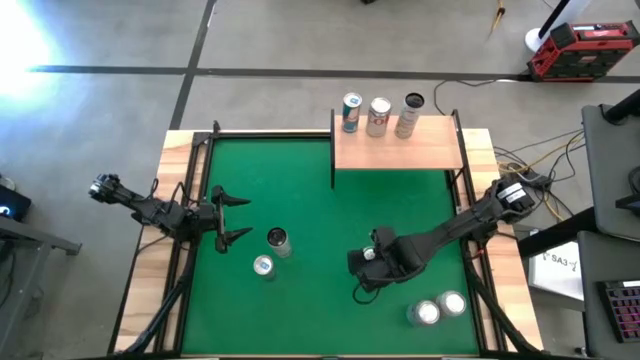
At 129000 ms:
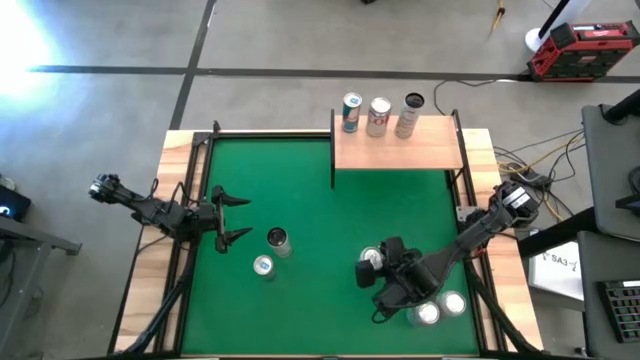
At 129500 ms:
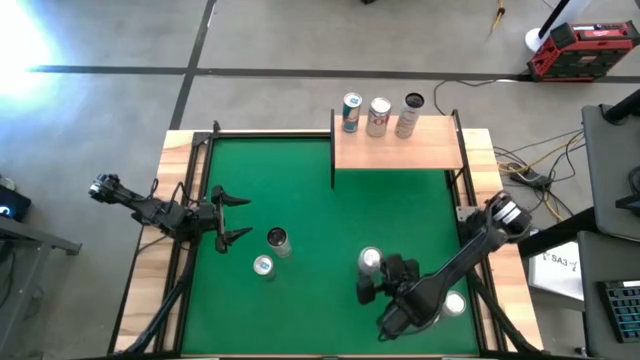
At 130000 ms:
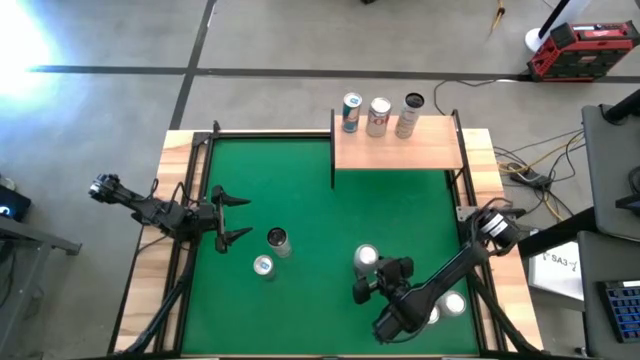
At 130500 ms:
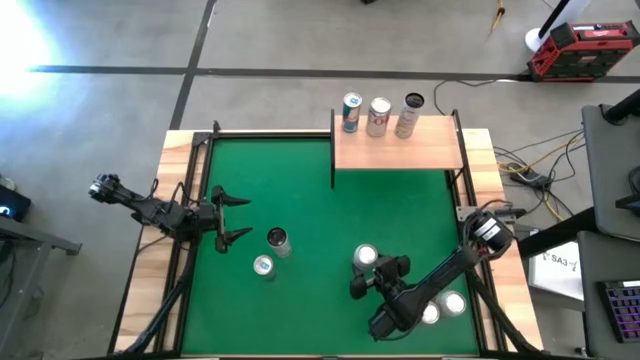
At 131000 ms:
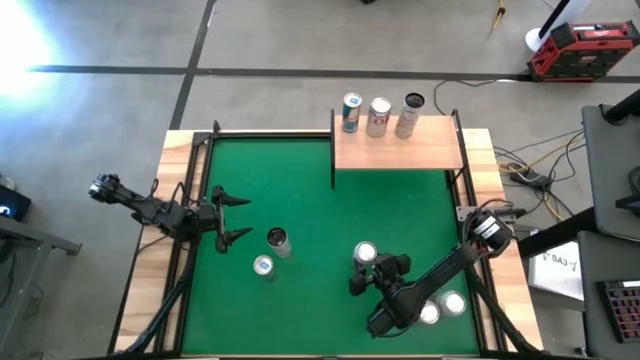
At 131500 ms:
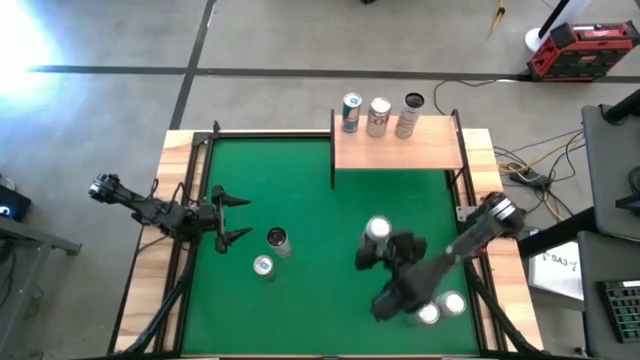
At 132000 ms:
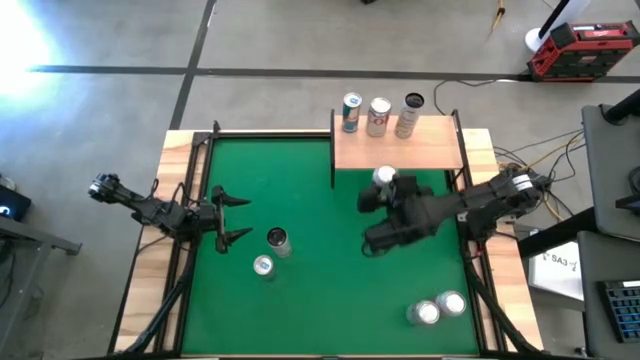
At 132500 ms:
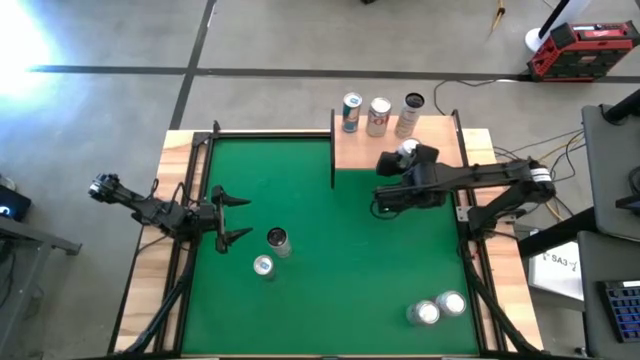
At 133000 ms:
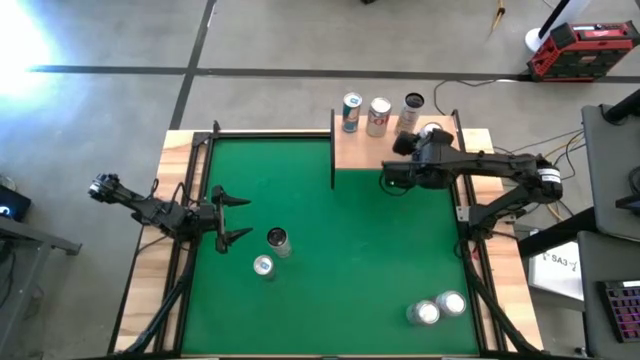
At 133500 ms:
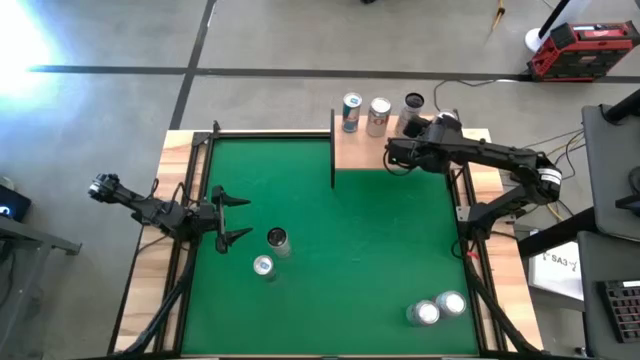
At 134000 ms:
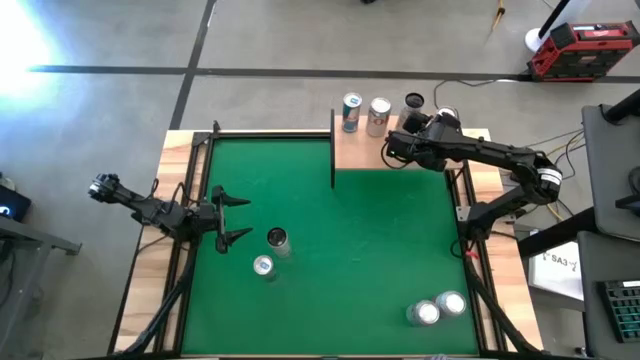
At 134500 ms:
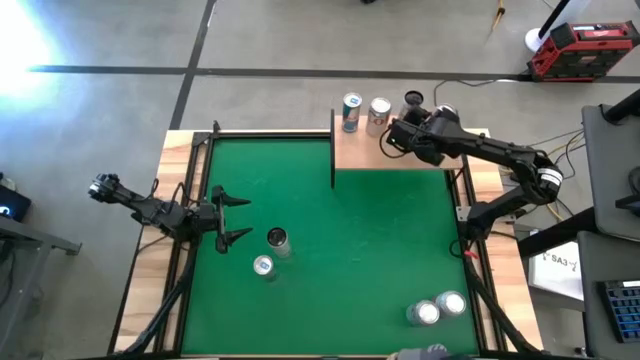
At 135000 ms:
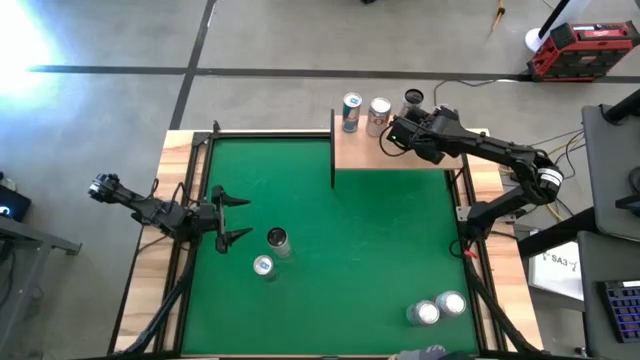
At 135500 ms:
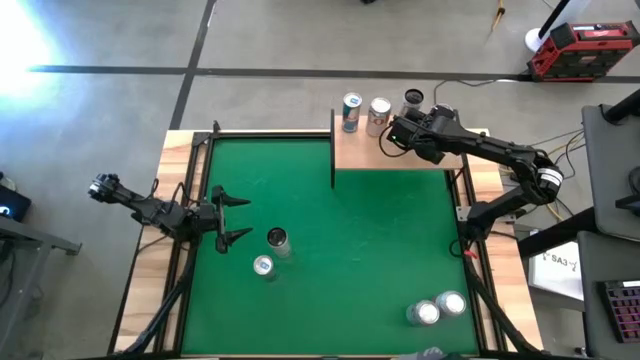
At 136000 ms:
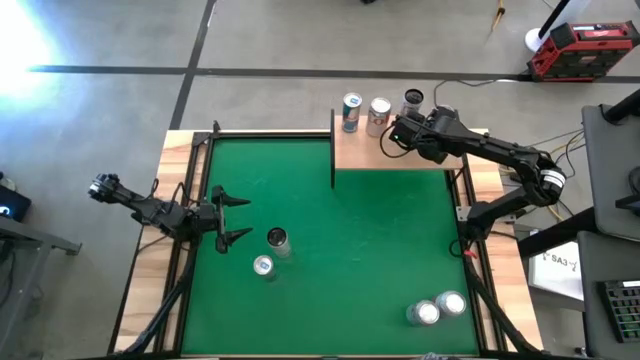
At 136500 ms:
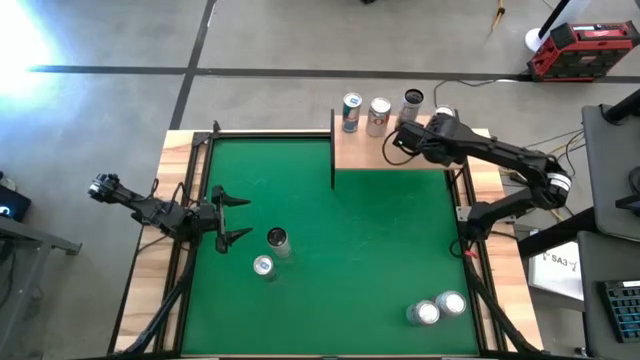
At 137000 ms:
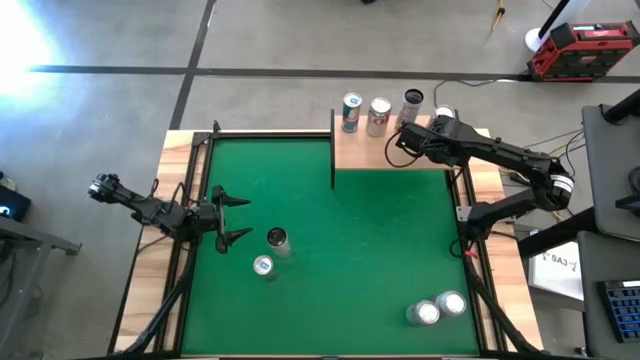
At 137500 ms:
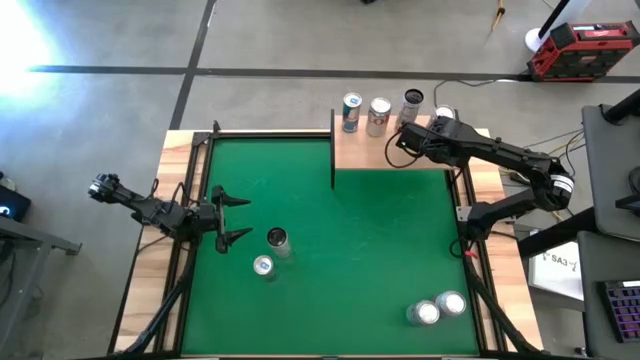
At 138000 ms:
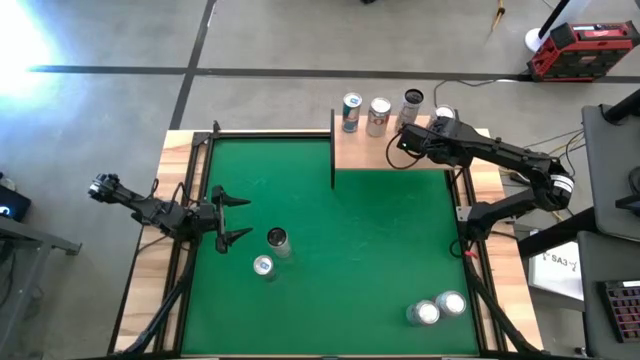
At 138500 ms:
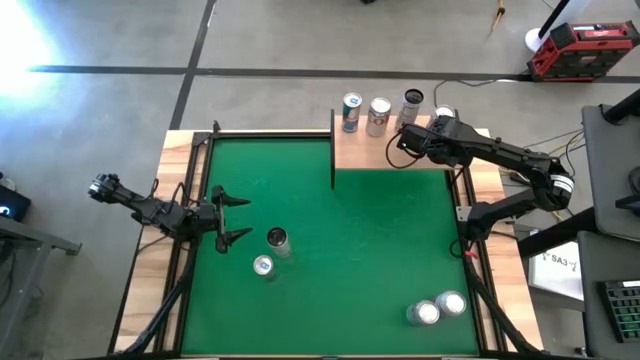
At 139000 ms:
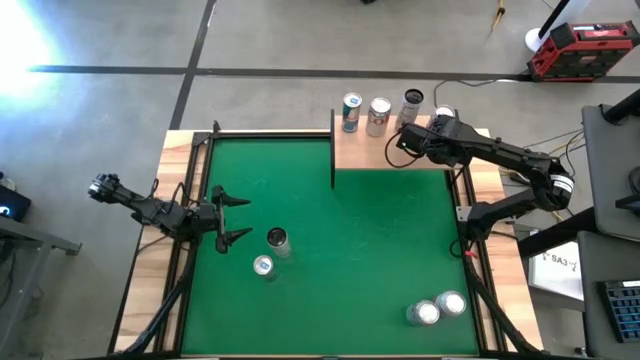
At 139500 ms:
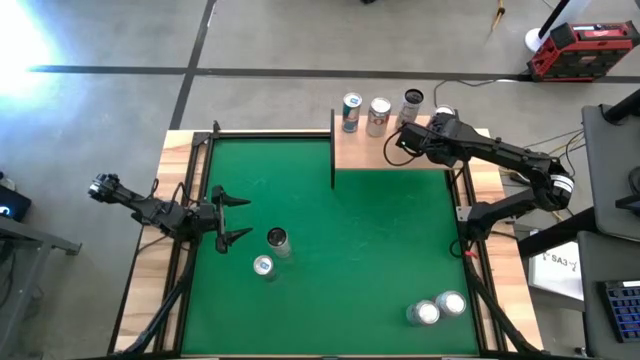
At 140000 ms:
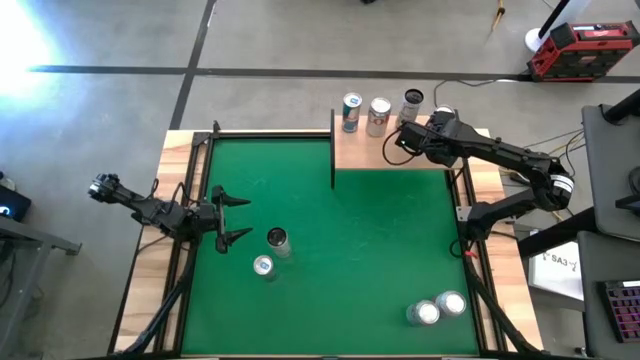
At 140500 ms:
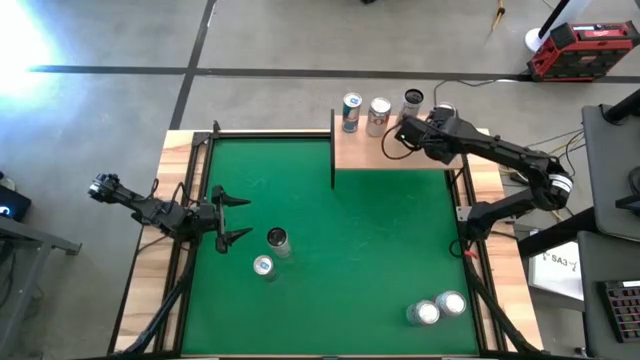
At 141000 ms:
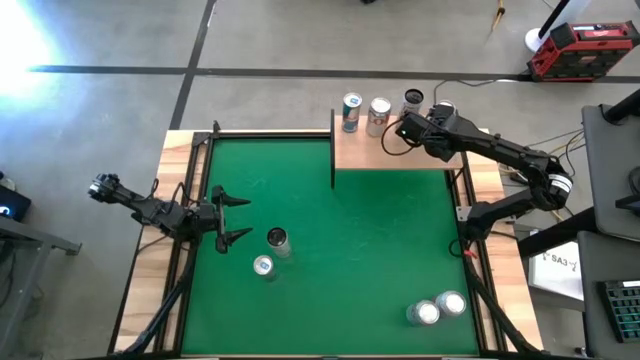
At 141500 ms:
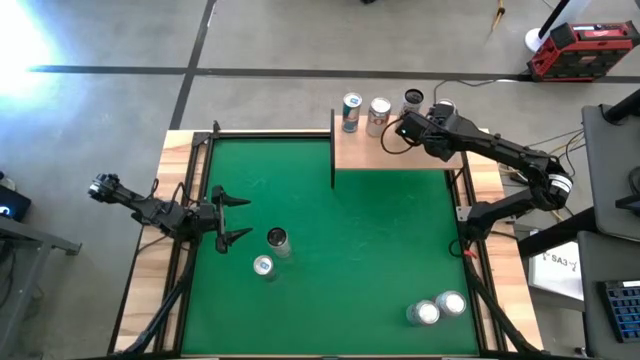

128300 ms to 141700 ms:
Task: Place canned beverage on shelf
Put the top pink-white soda can on the shelf

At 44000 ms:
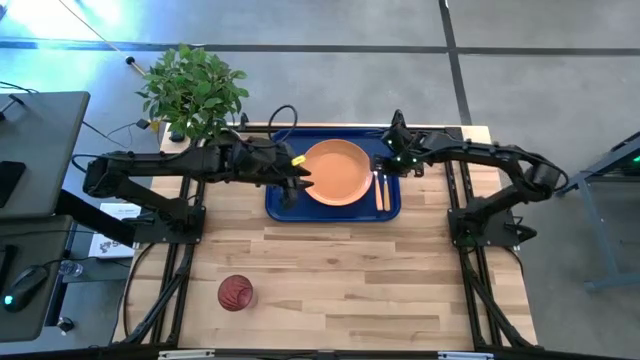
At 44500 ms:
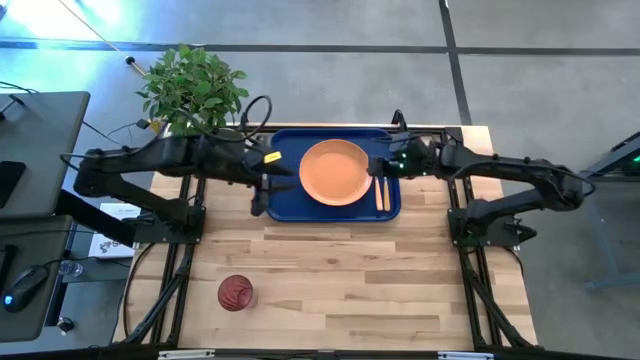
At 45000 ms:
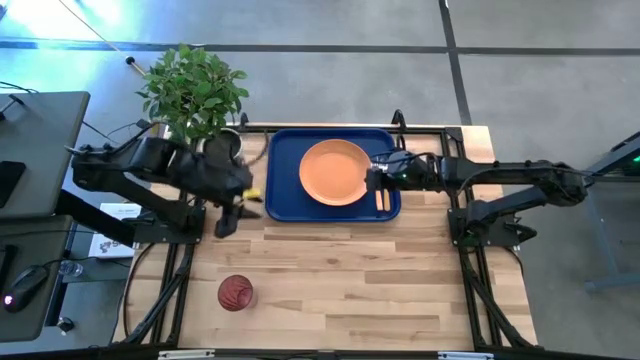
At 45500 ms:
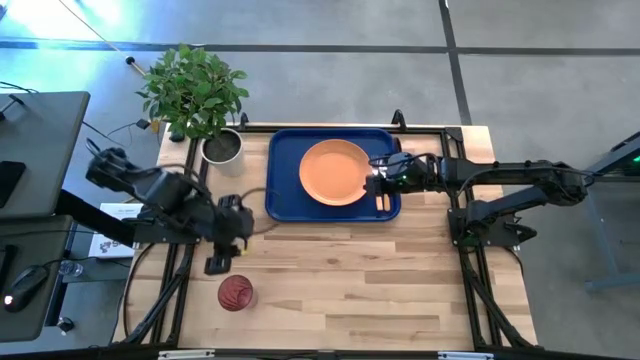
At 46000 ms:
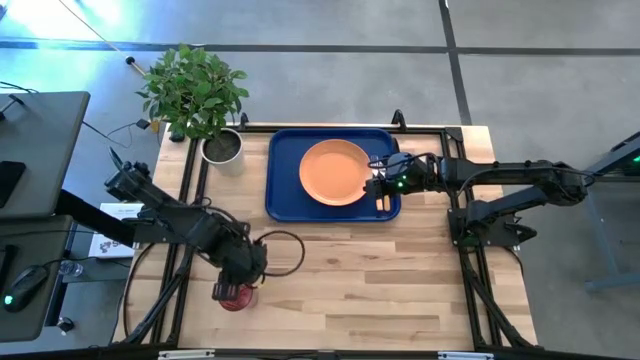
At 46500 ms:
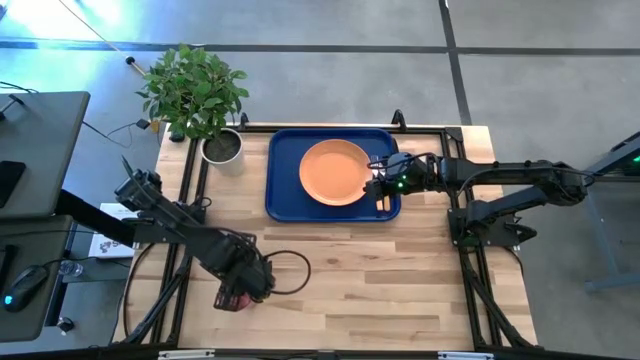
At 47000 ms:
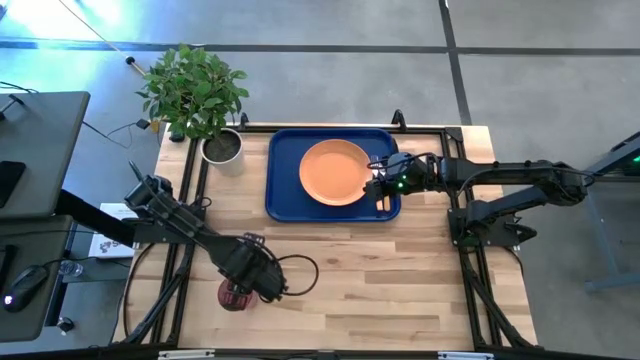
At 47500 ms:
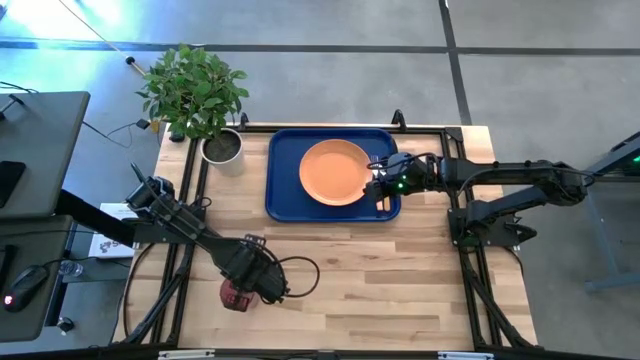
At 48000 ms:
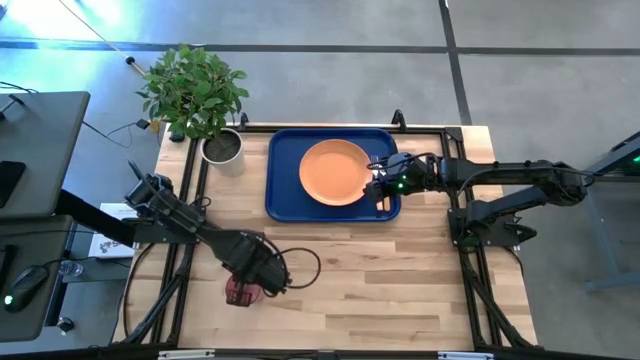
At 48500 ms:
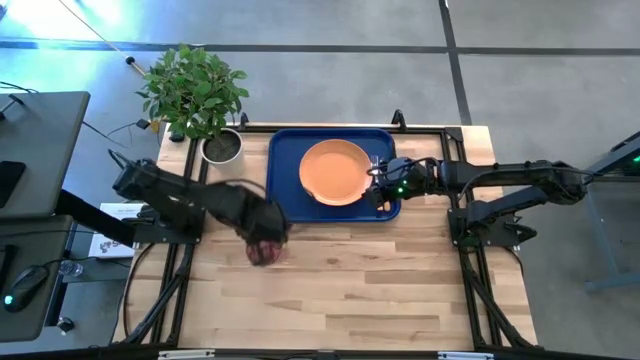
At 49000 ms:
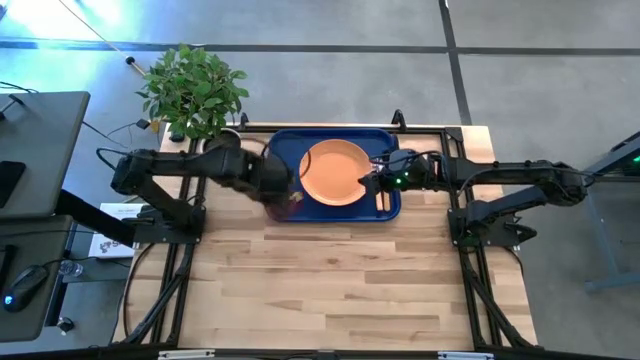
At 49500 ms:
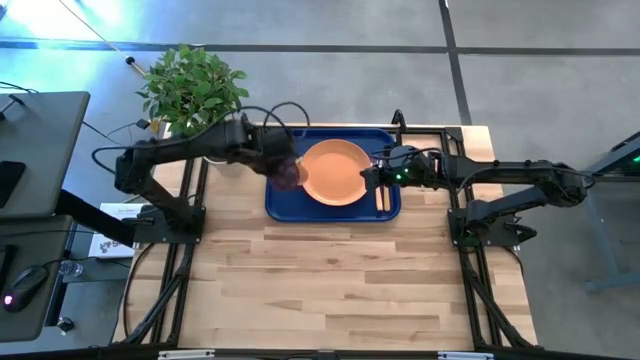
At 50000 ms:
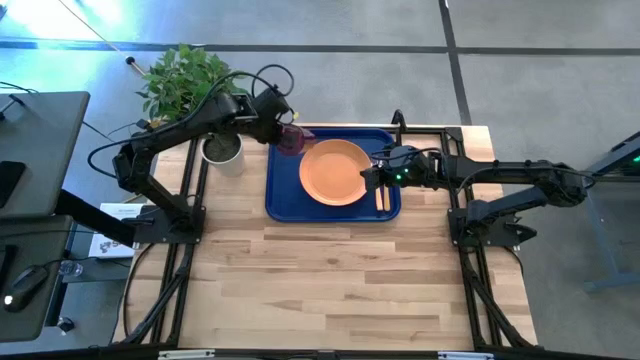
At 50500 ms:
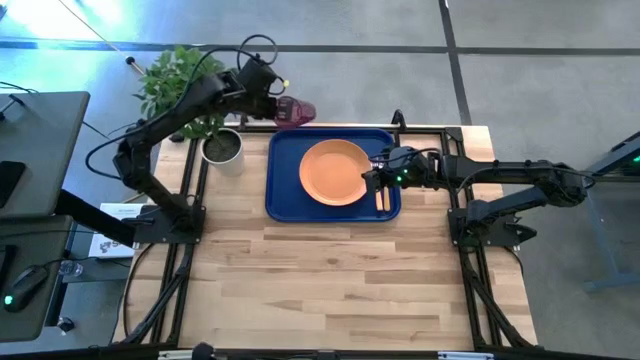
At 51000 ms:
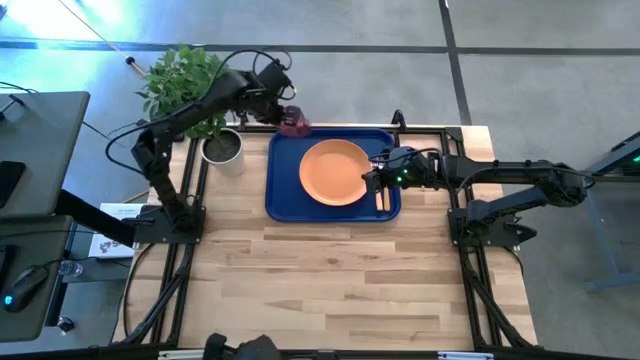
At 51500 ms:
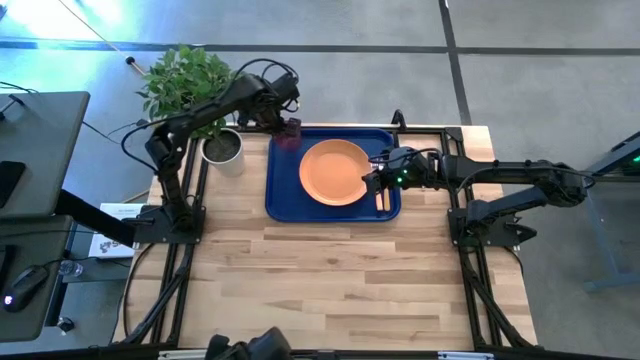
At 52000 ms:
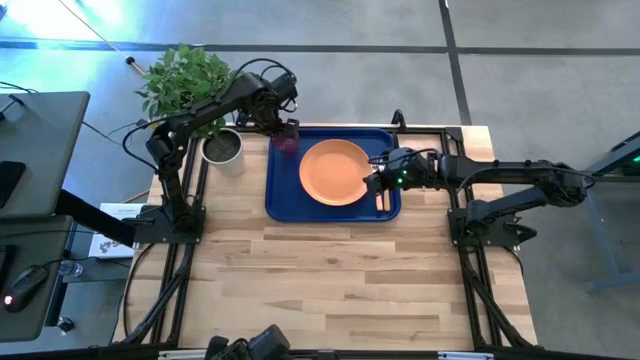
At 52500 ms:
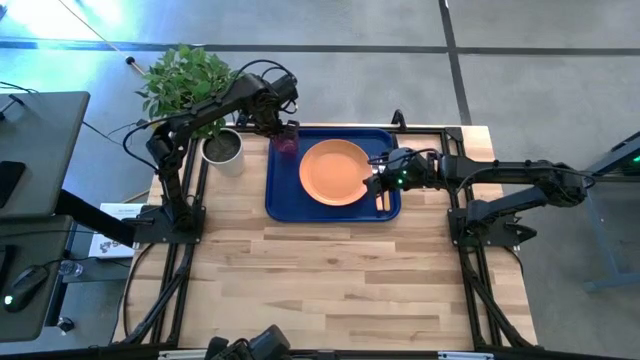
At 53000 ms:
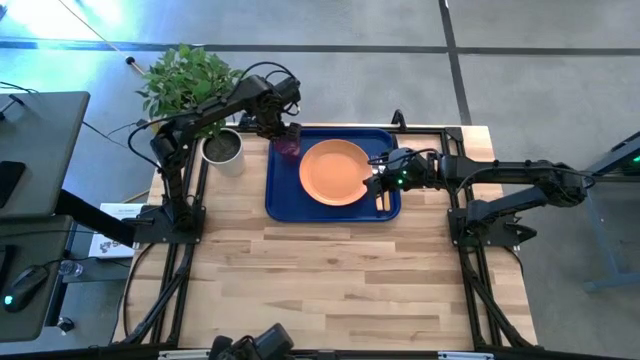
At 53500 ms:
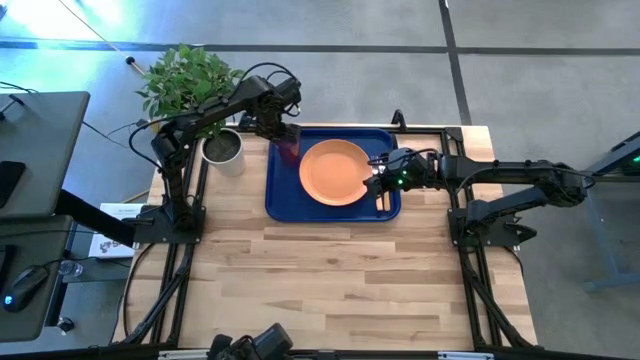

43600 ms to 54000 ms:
Task: Pick and place plate/cup/fork/spoon on tray
Put the red cup on the blue tray
